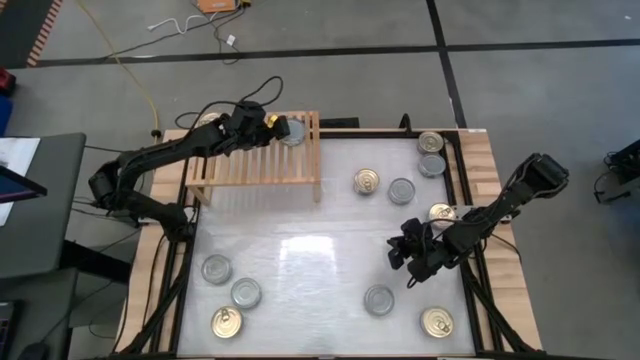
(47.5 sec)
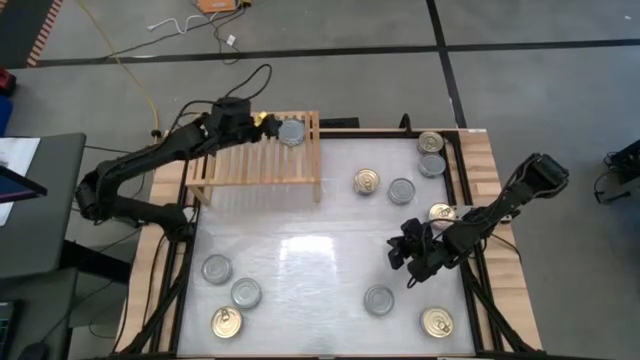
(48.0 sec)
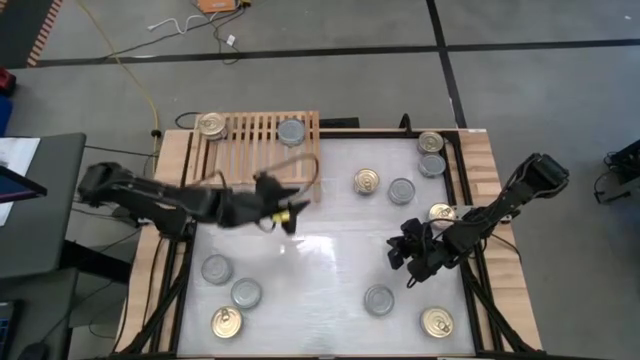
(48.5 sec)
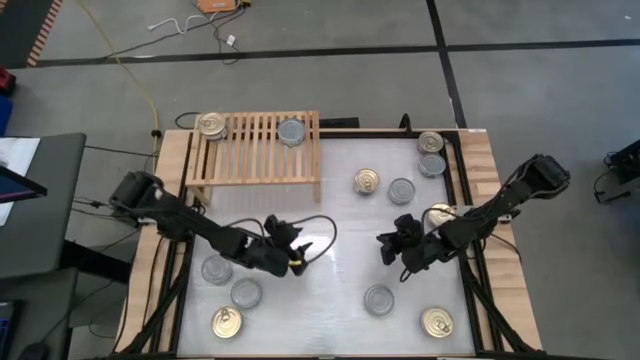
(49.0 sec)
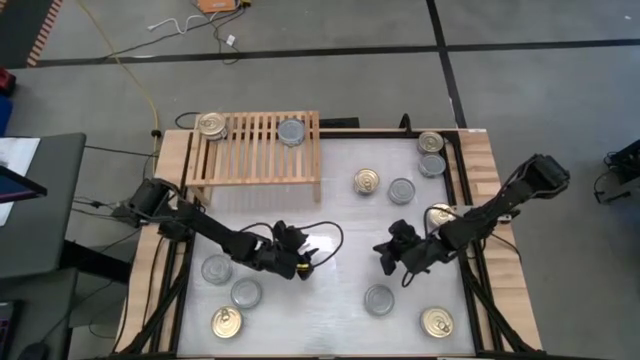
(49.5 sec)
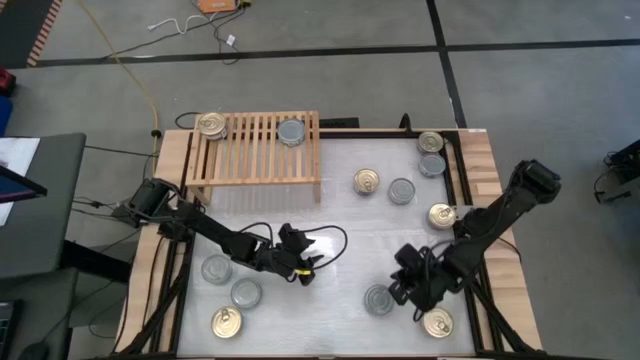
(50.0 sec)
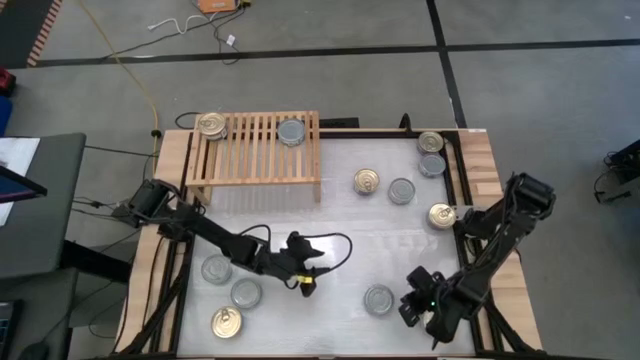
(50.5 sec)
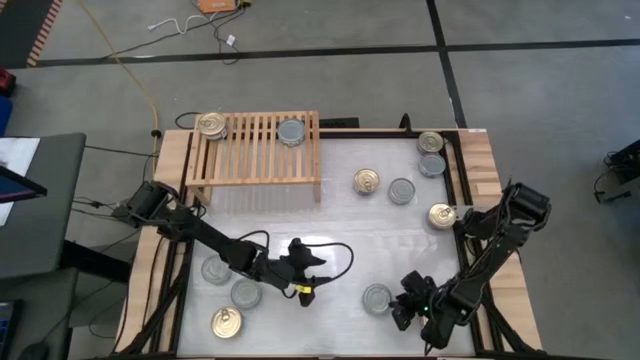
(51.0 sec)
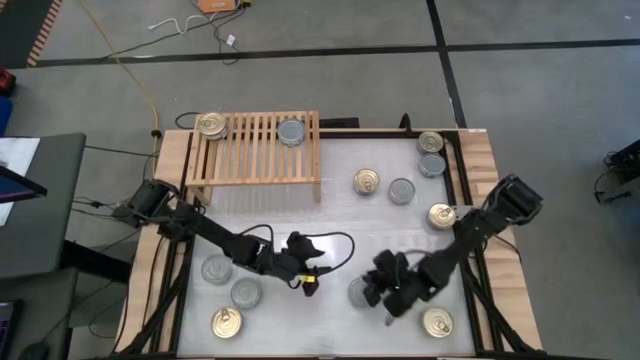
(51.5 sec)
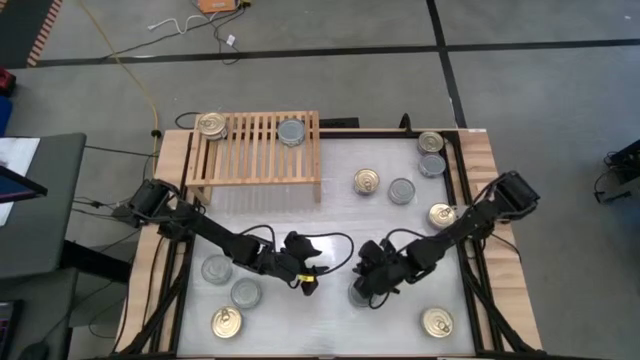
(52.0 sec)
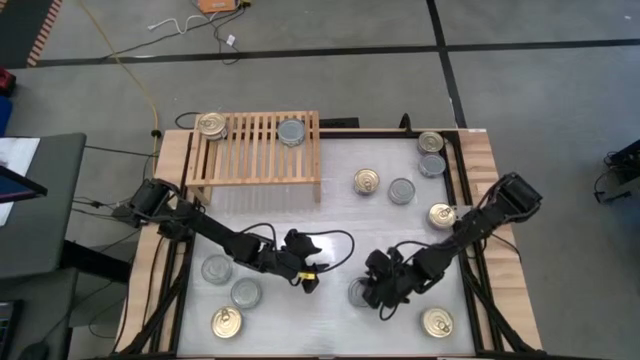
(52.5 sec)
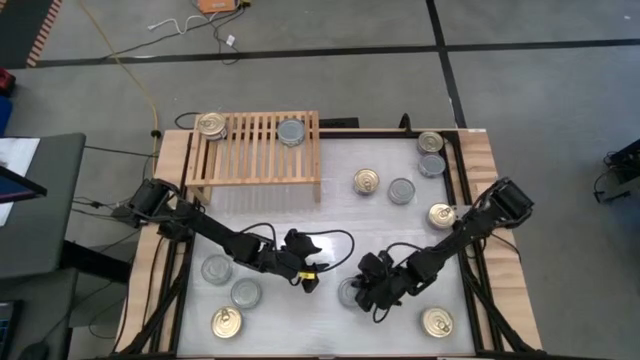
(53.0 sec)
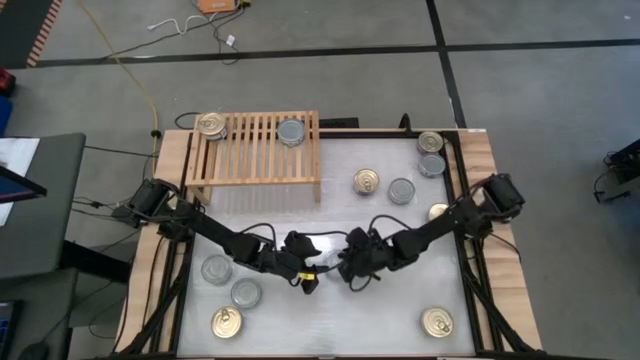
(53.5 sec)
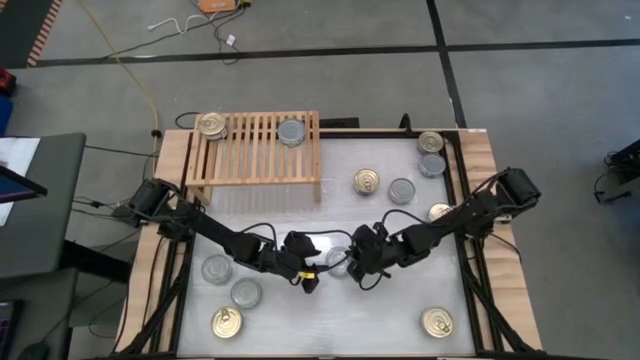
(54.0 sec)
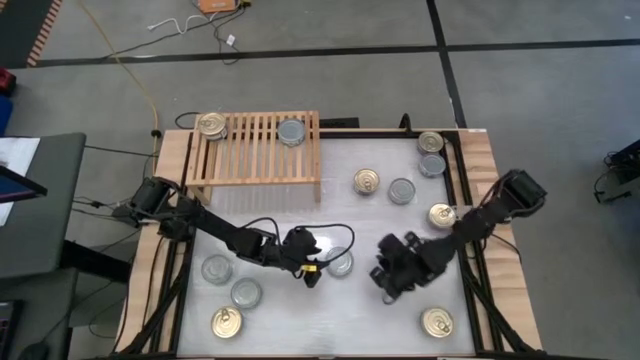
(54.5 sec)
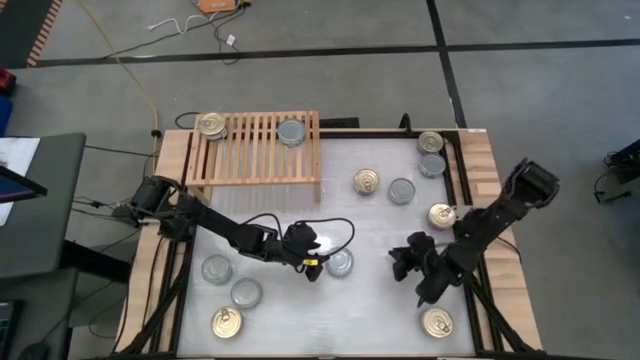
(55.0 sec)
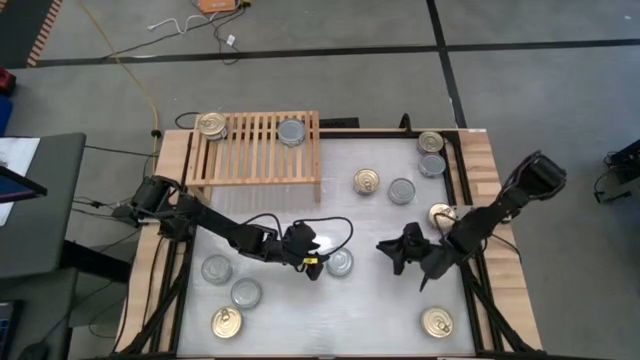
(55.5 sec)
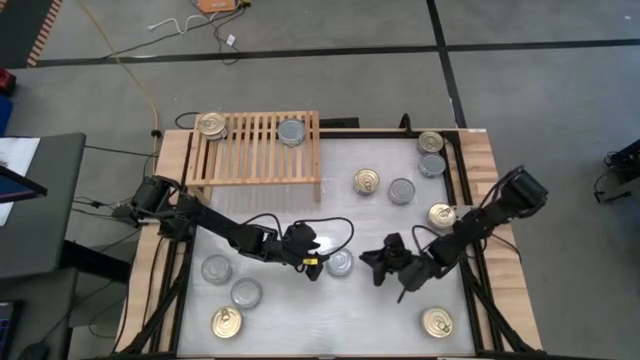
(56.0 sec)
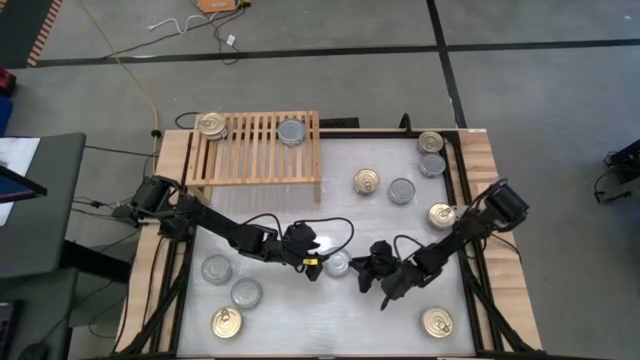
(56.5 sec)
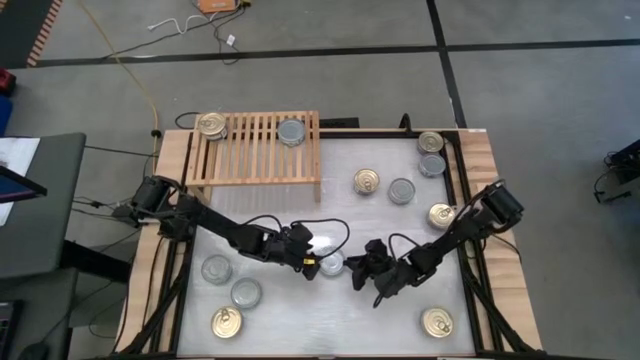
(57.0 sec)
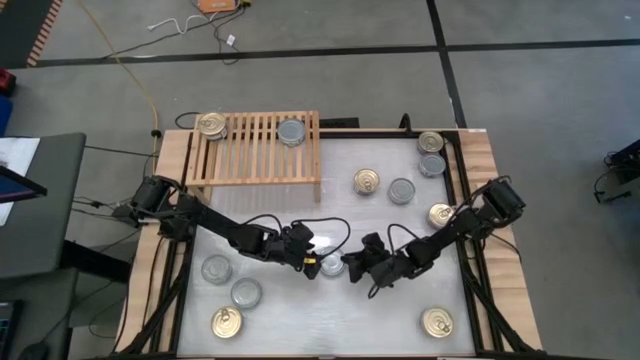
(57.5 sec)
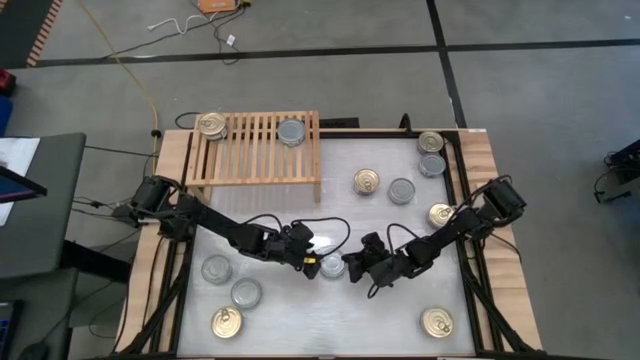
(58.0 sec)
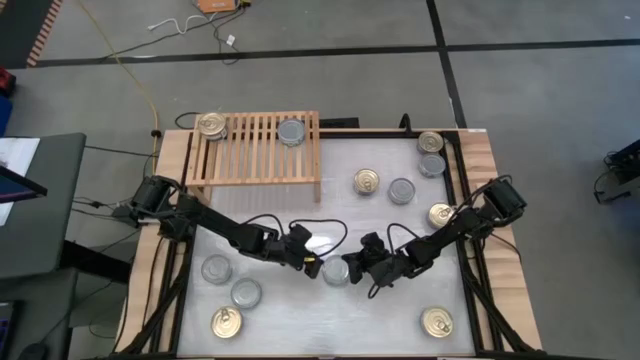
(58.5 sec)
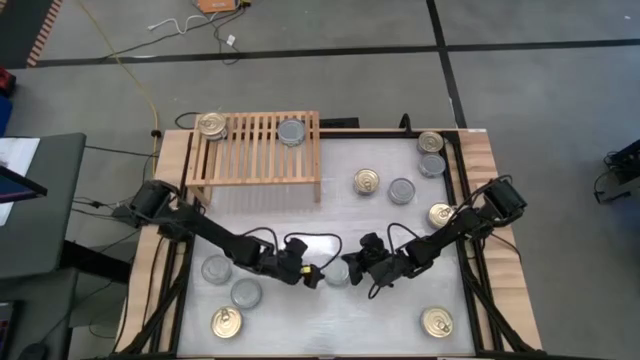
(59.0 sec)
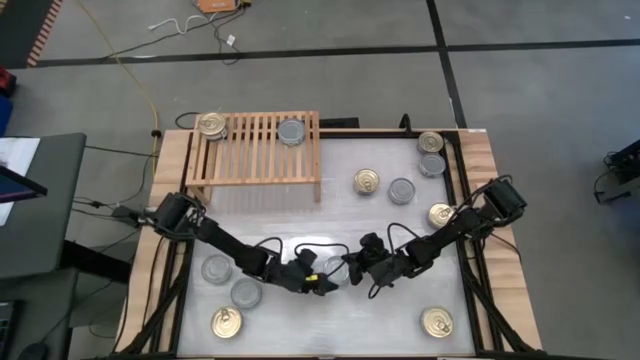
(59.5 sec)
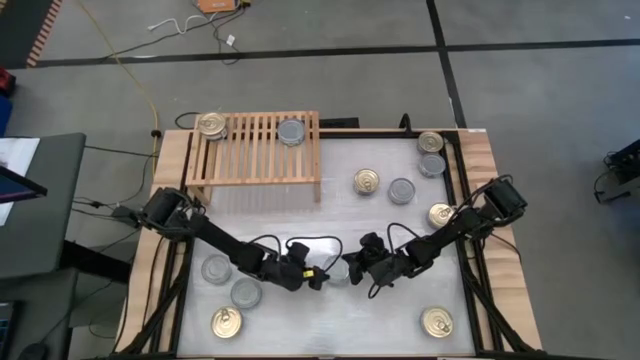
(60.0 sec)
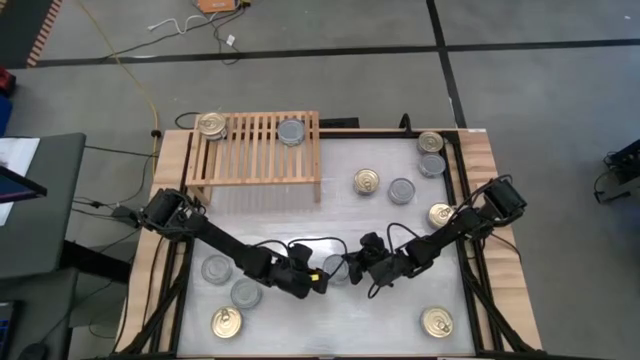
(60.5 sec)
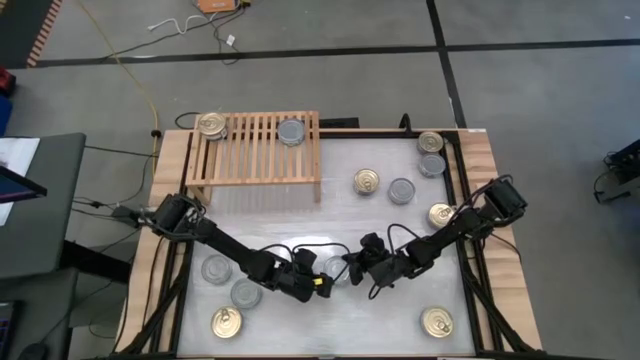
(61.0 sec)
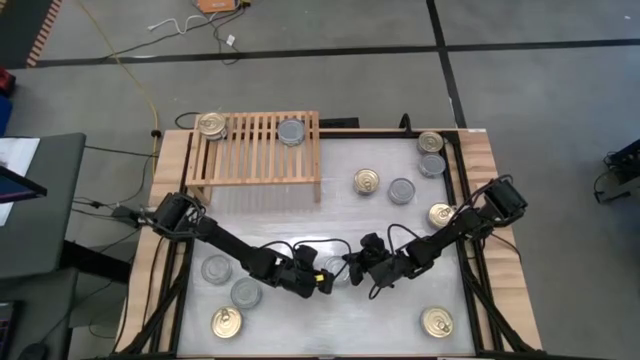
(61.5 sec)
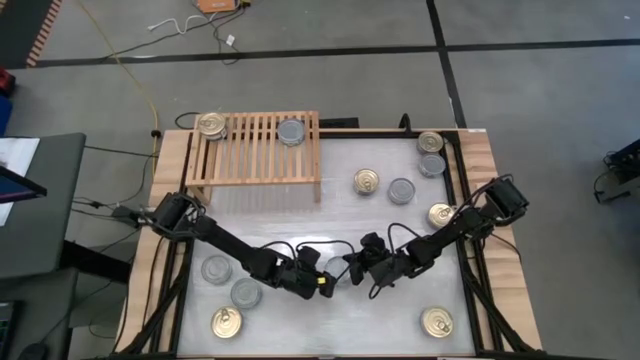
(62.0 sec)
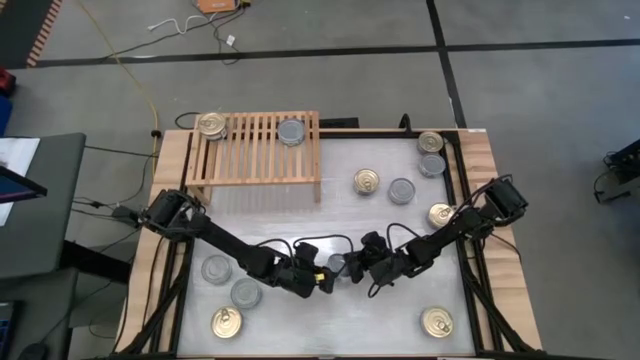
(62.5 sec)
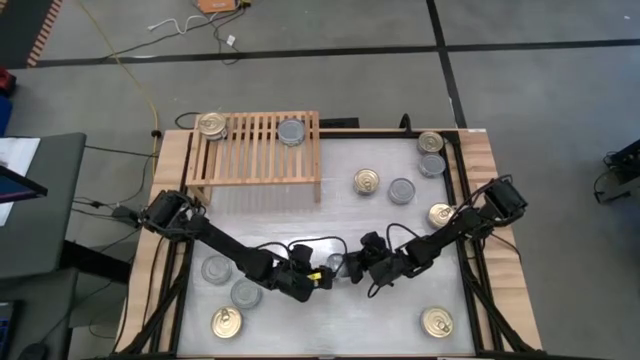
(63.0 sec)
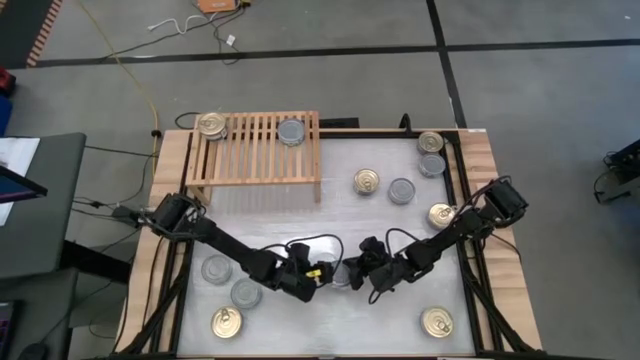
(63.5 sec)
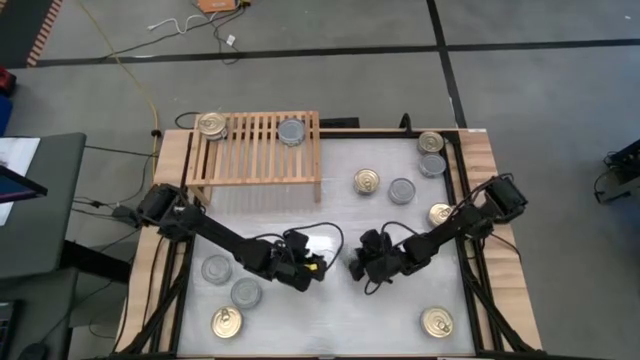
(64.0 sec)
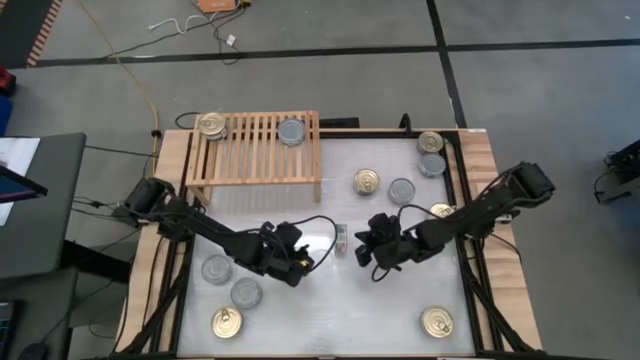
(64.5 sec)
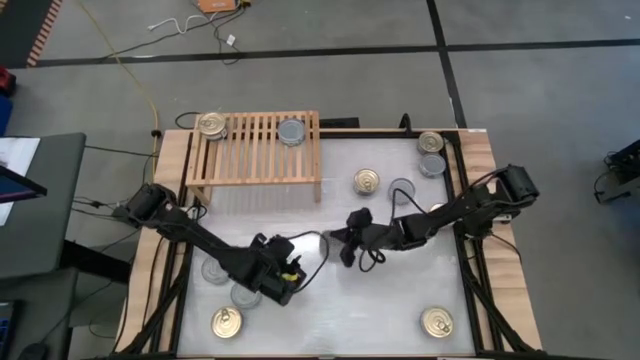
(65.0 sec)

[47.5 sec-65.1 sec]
Task: Stack canned seafood by type on shelf
Stack the green tuna can on top of the green tuna can on the shelf

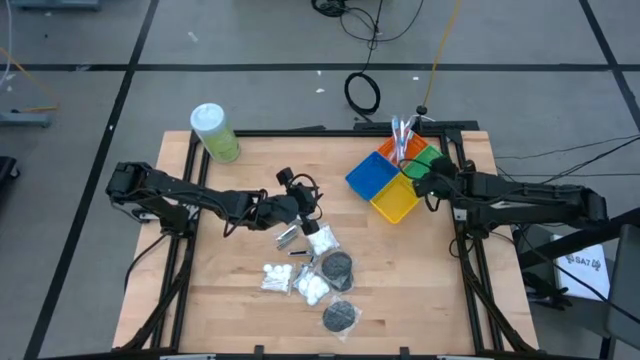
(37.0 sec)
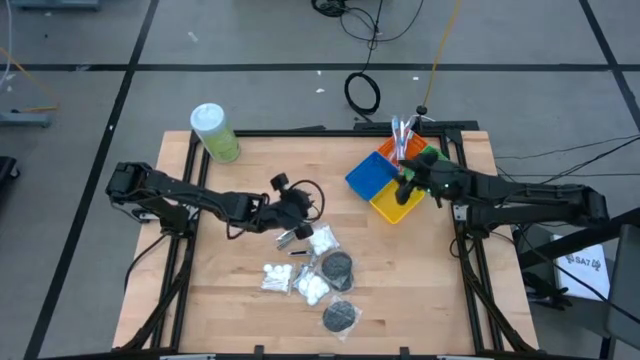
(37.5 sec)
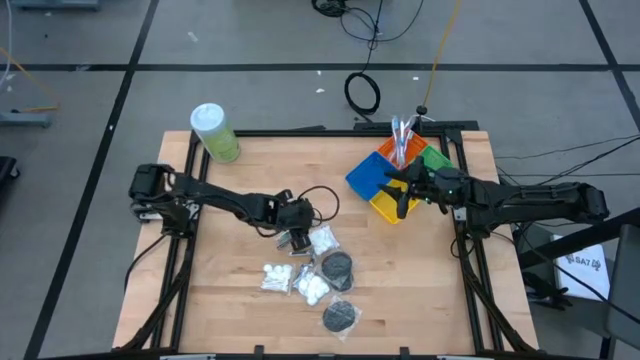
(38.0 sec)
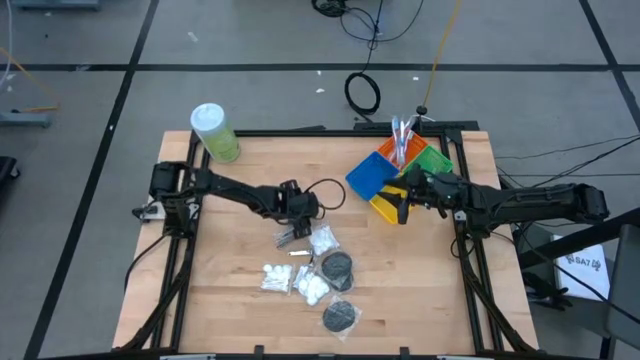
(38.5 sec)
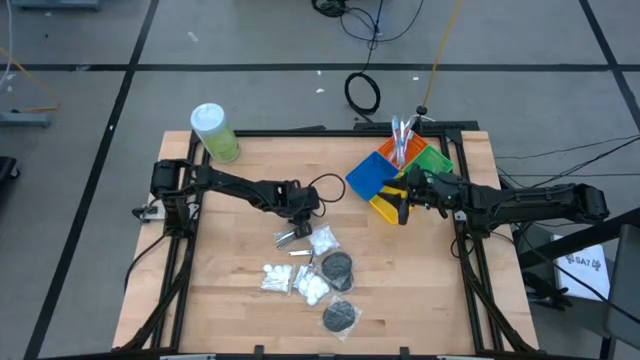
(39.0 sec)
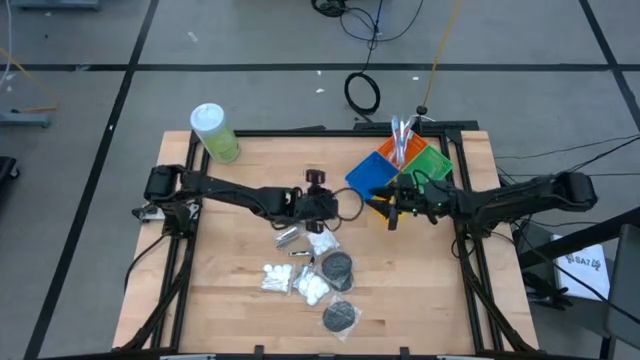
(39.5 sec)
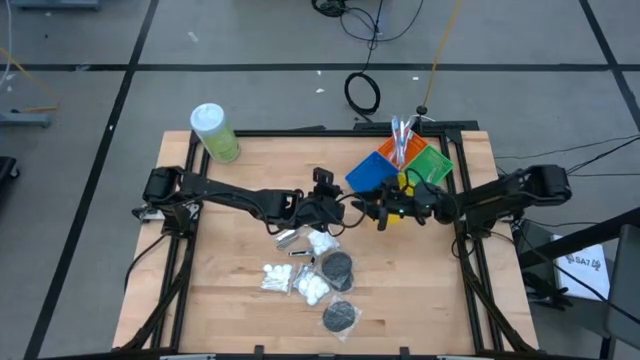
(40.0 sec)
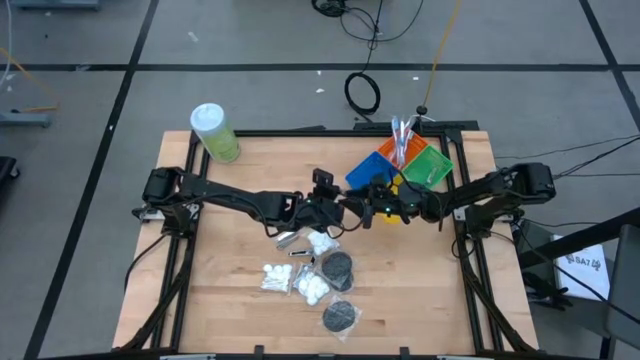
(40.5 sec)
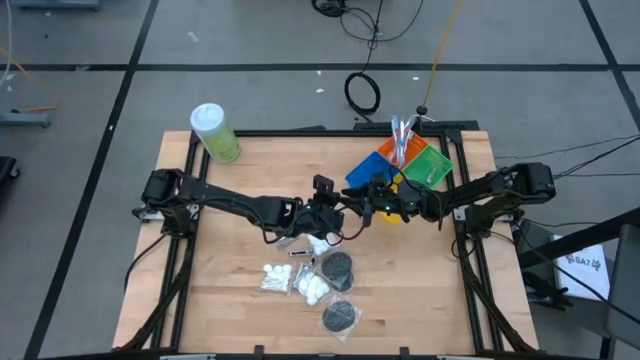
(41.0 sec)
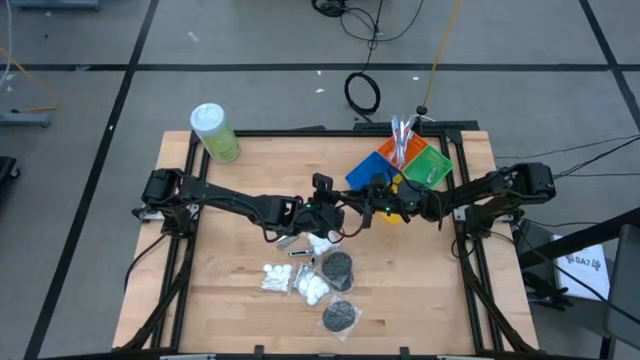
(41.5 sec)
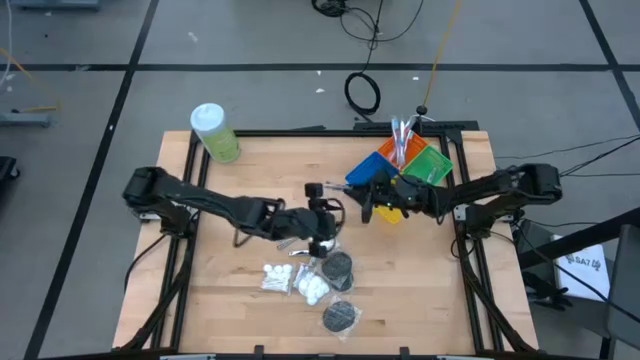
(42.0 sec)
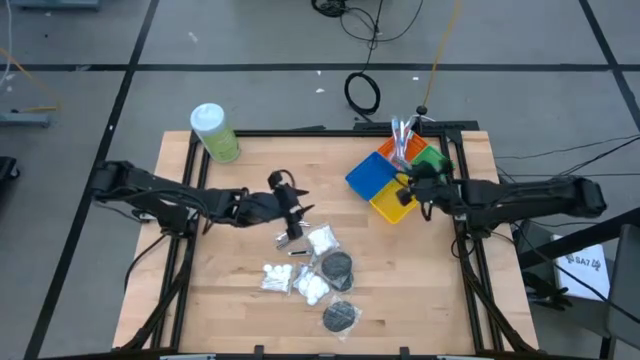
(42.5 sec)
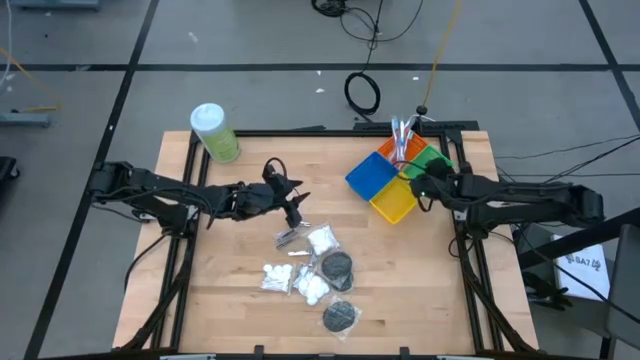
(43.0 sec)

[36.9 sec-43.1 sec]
Task: Pick & Place Travel size toiletries
Put the nail cutter into the green bin
